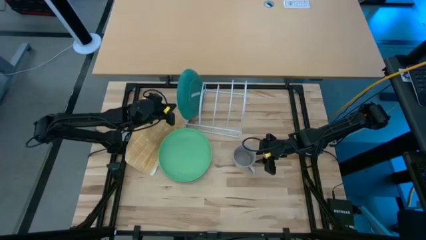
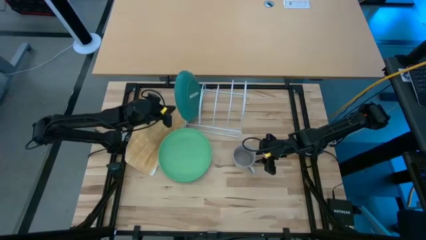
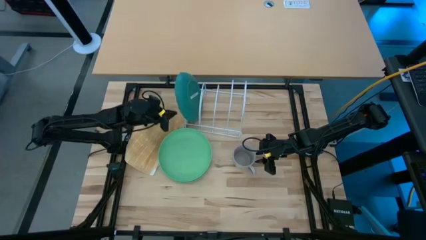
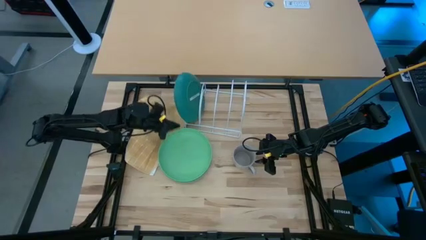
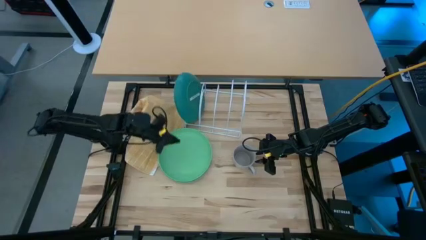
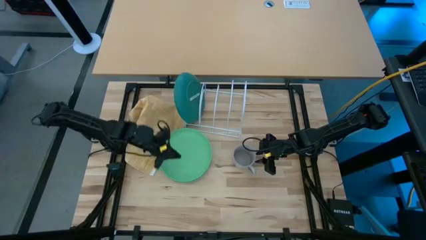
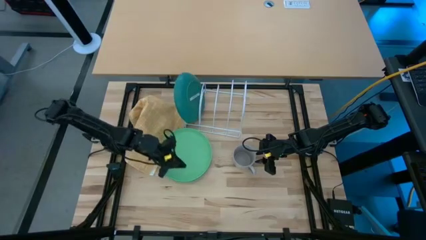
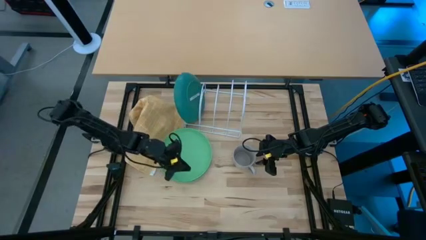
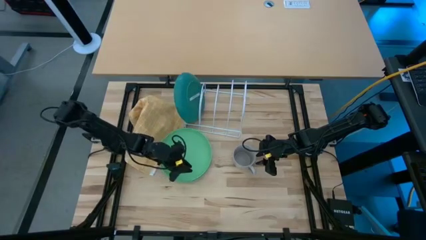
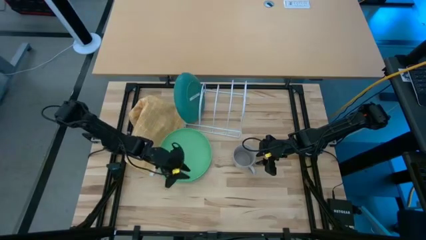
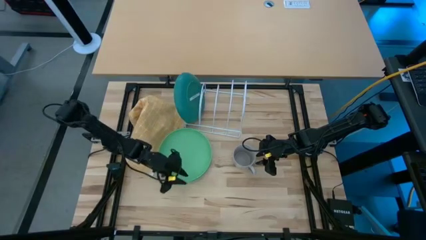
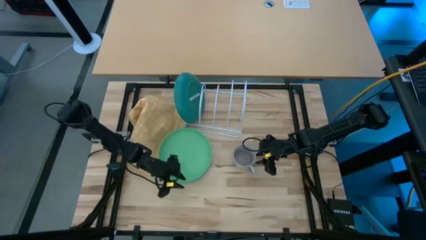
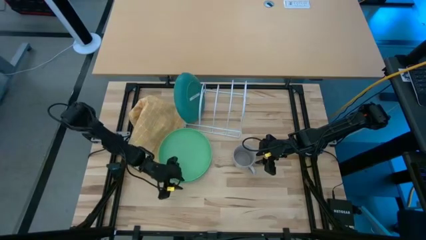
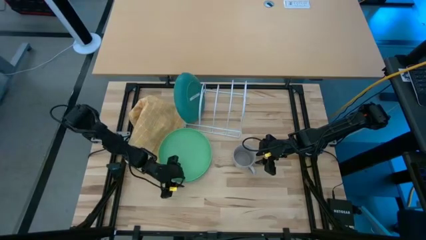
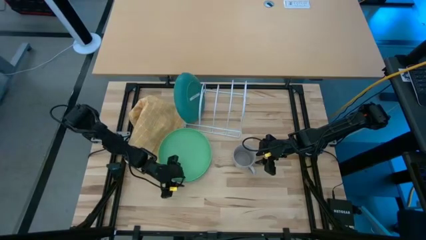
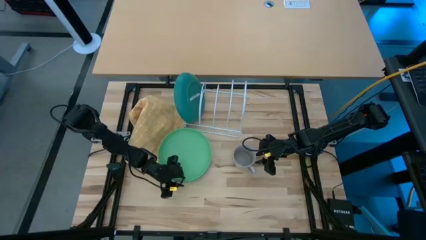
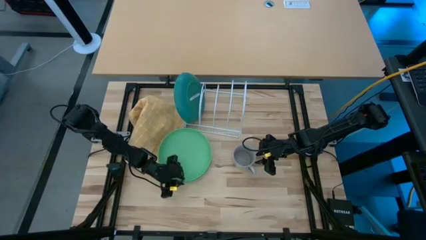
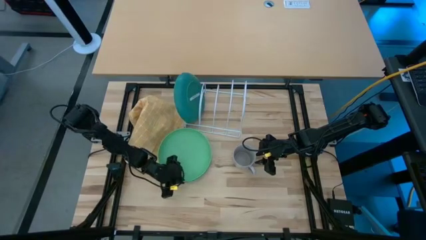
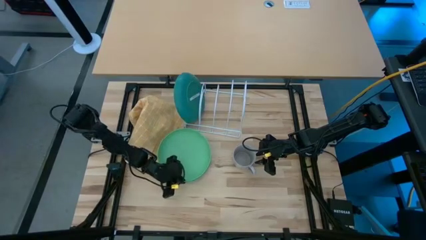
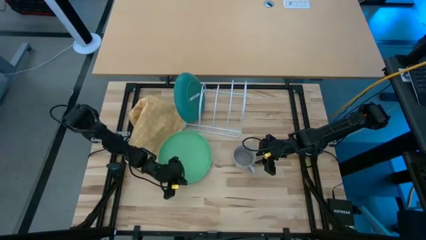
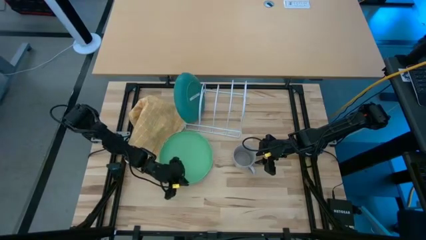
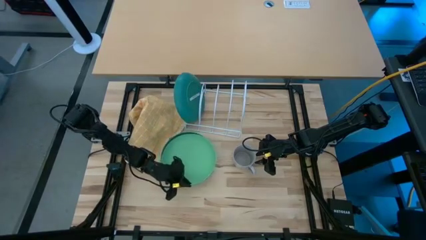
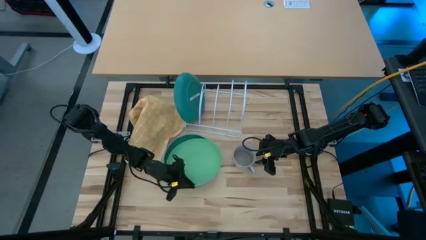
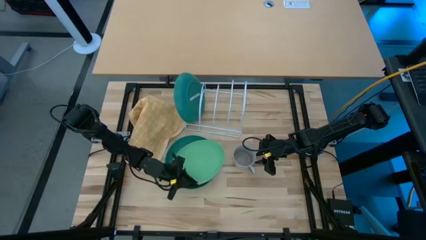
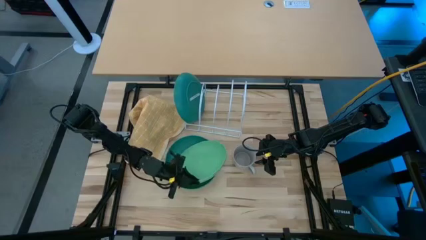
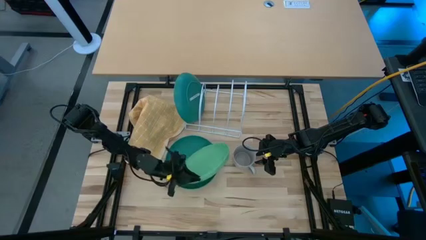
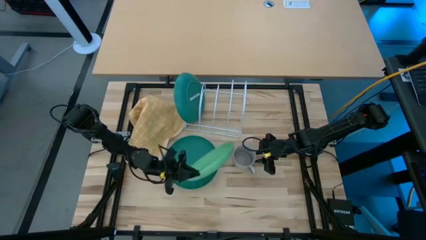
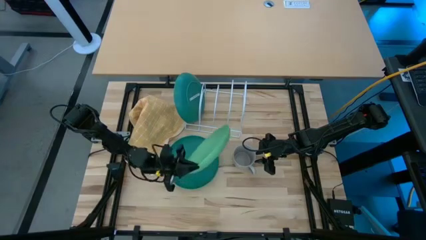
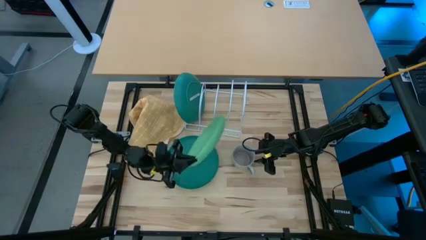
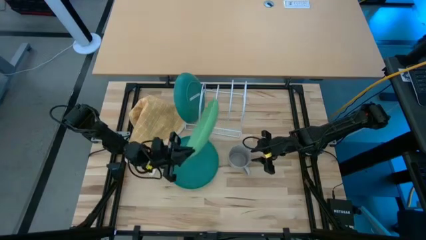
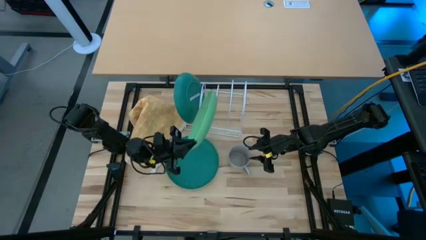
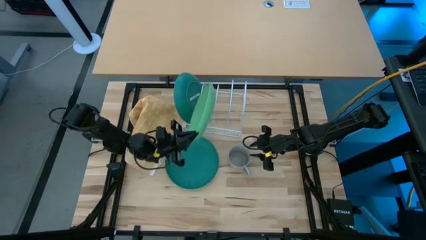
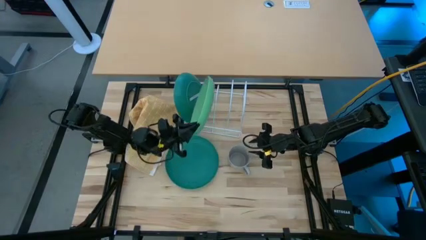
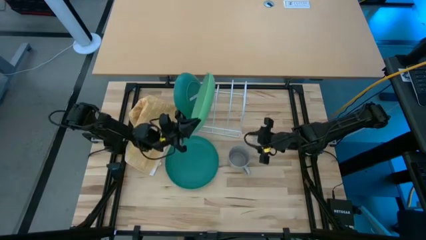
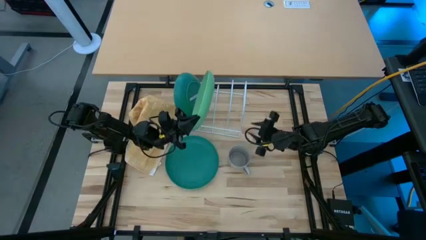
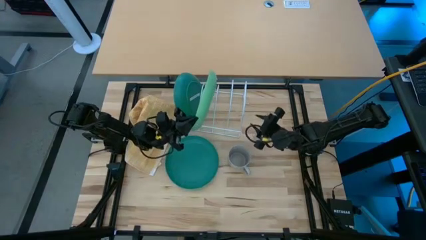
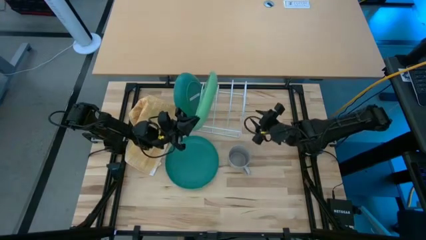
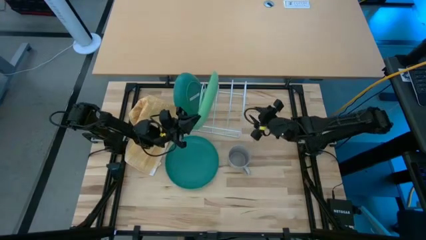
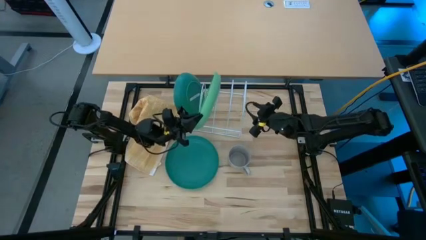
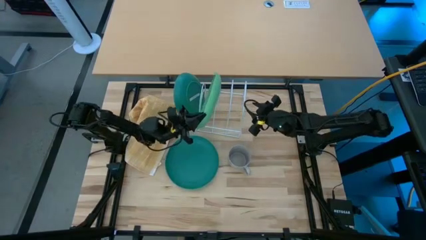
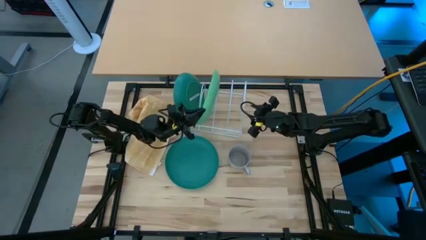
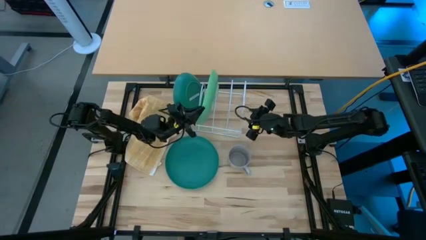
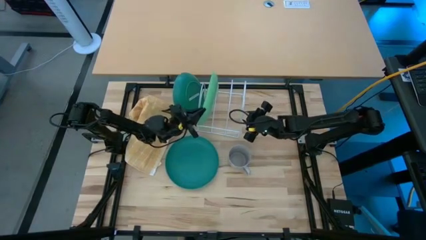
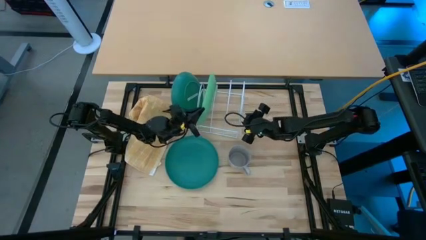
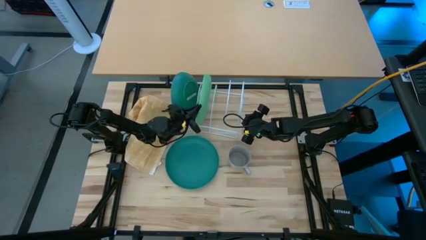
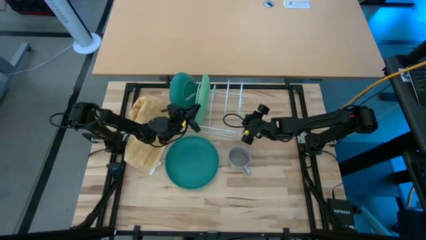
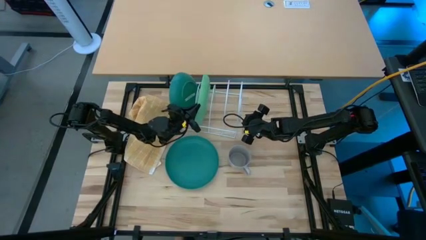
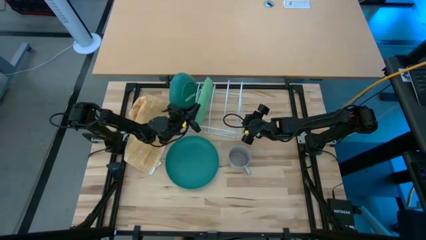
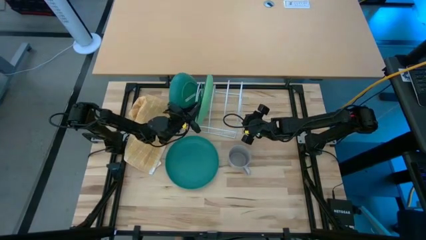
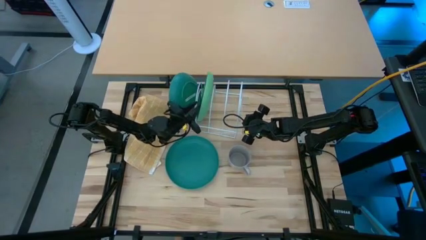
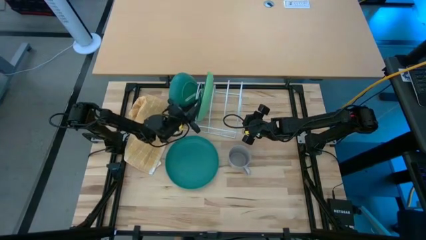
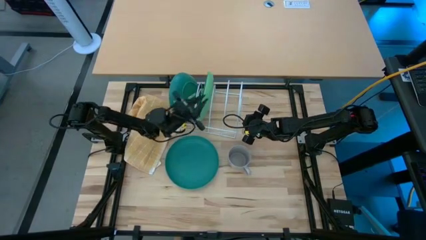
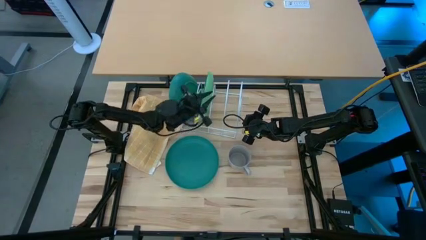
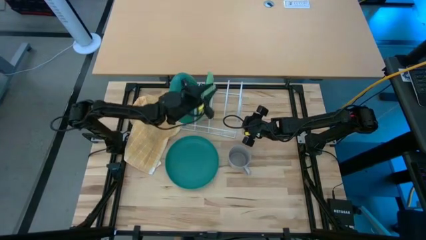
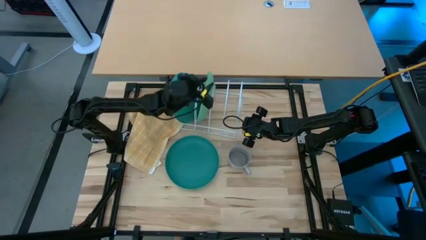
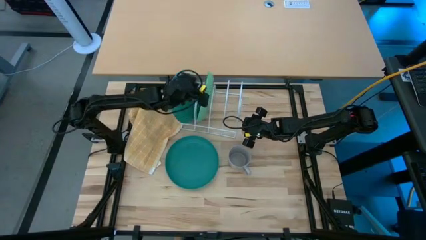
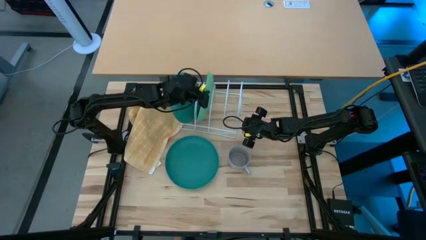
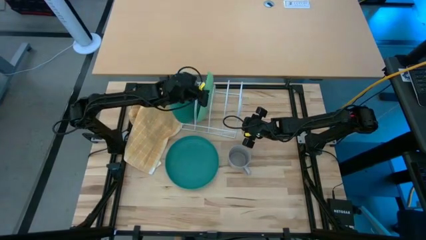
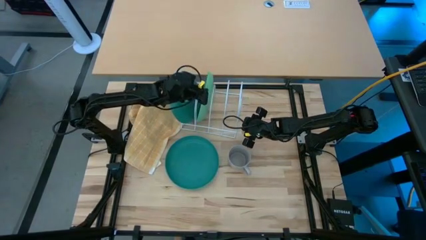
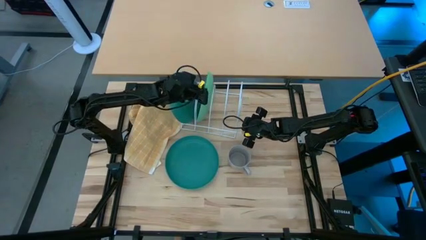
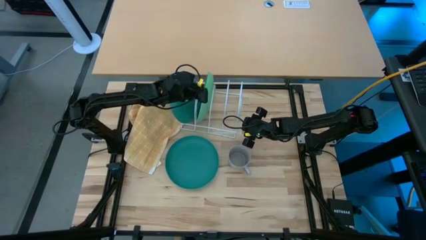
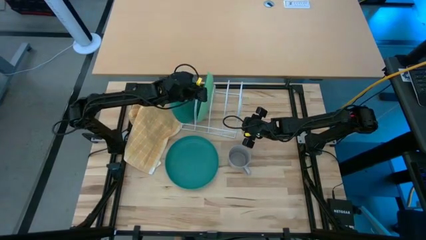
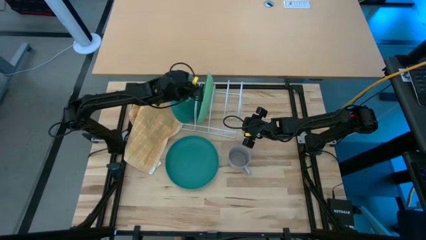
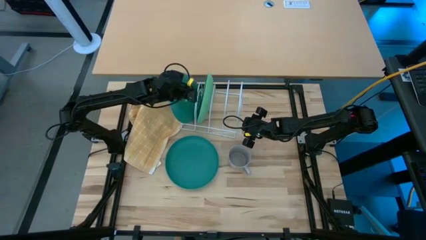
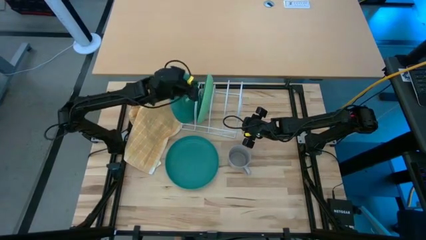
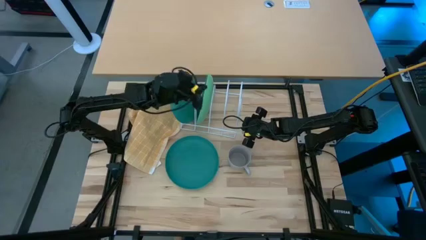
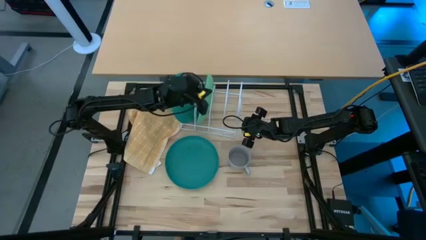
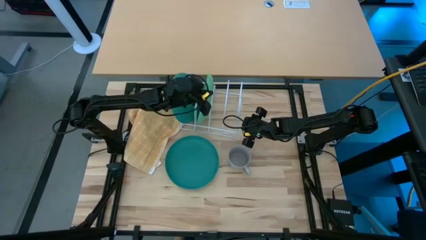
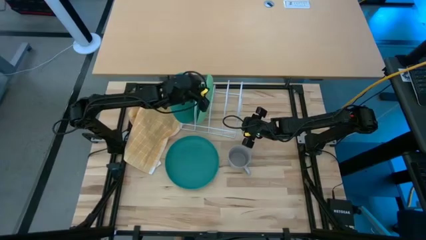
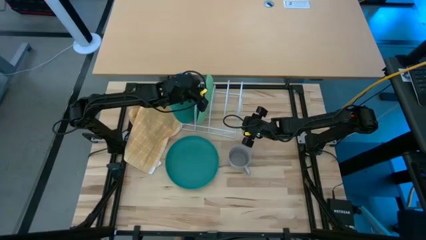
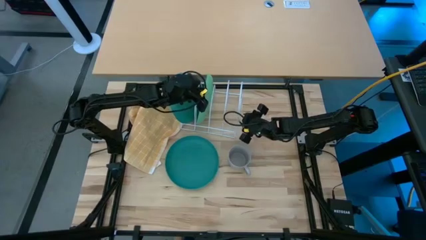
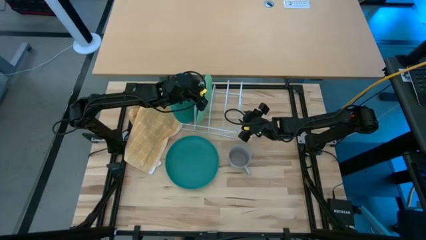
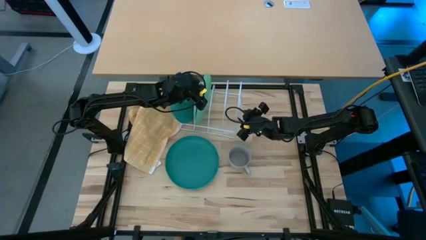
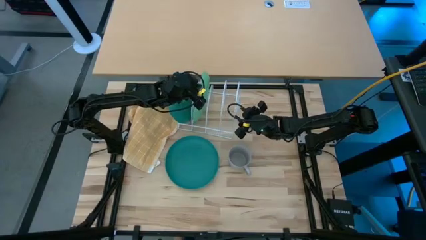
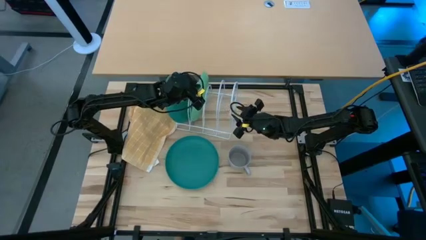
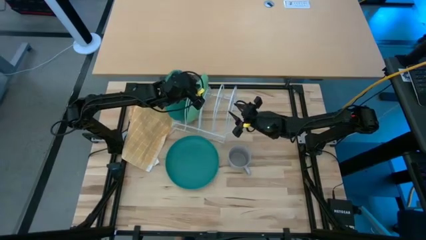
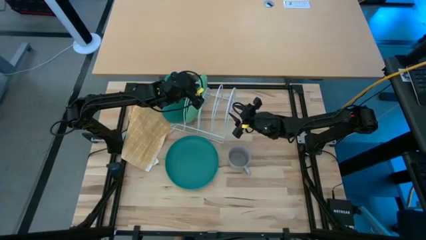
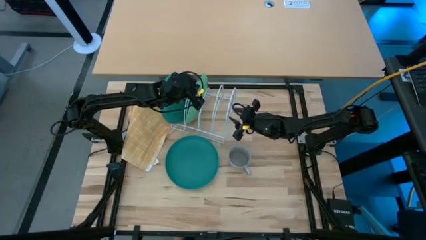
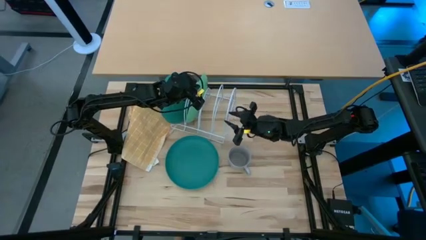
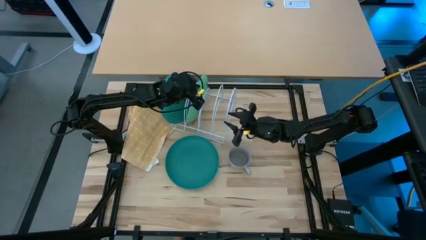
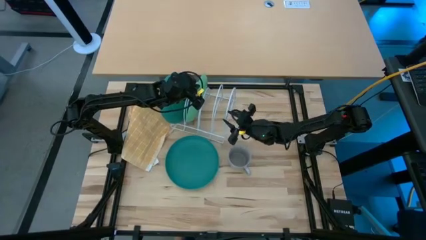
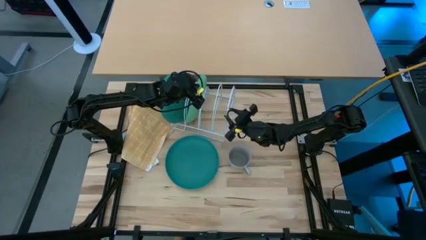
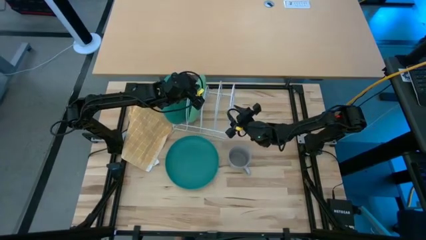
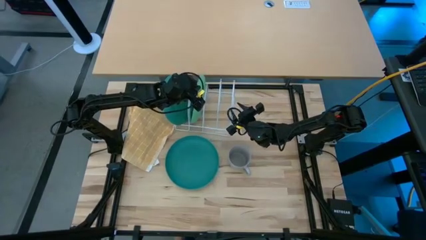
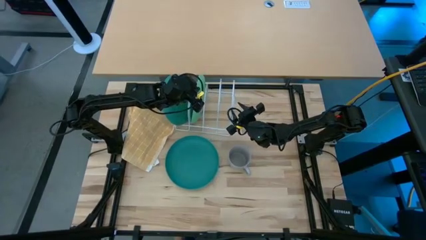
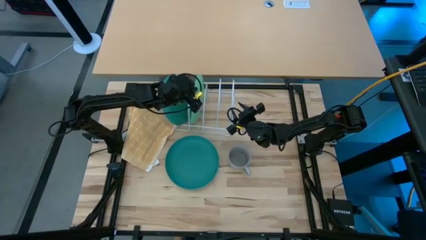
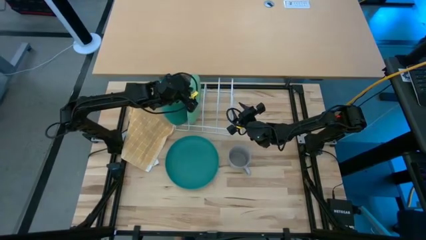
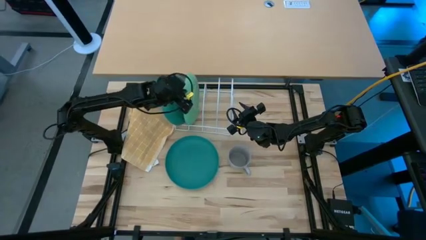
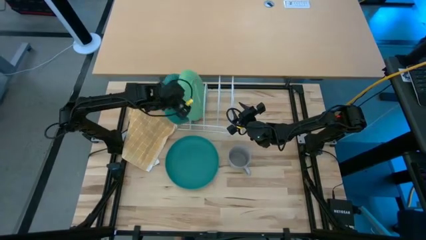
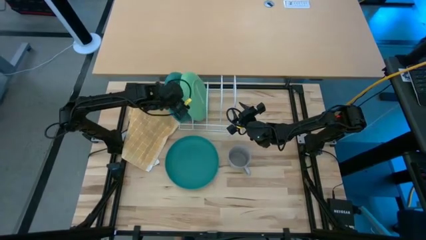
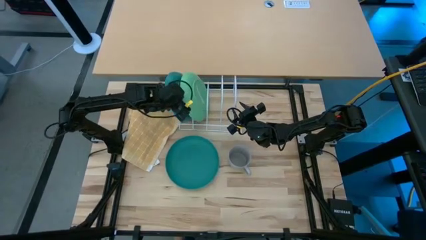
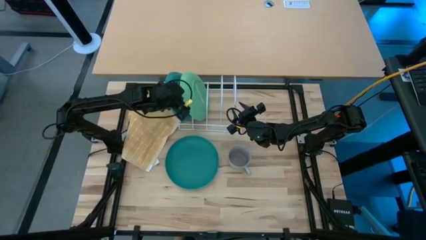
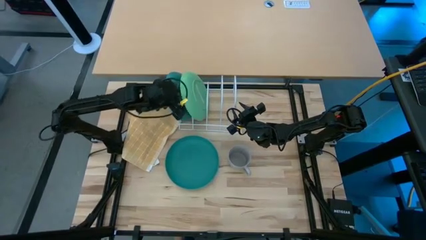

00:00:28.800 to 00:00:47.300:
Task: Sort dishes
Put the green plate into the dish rack
